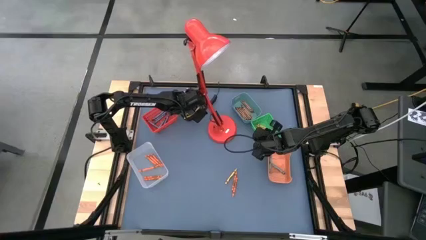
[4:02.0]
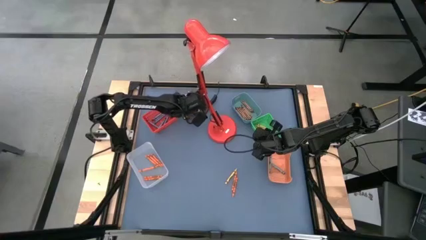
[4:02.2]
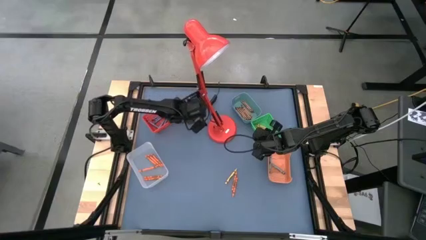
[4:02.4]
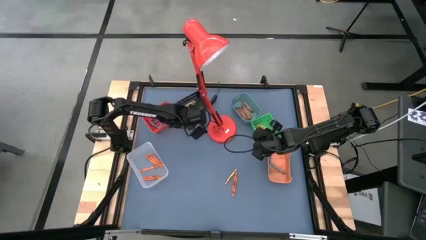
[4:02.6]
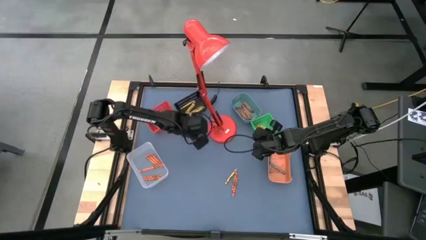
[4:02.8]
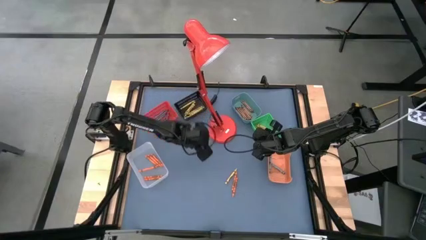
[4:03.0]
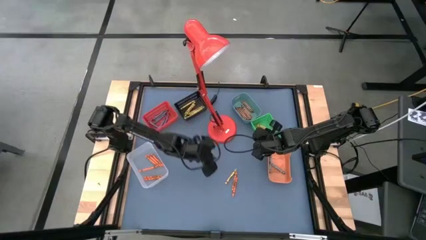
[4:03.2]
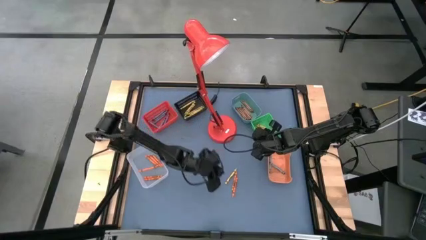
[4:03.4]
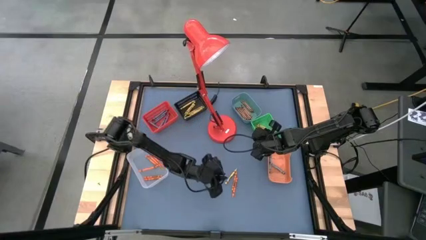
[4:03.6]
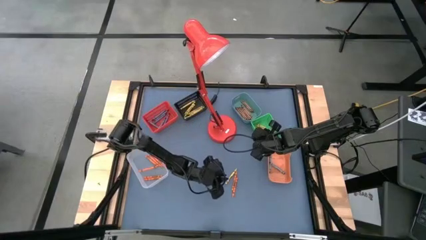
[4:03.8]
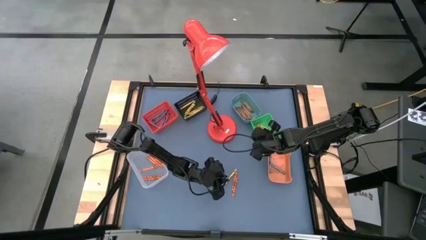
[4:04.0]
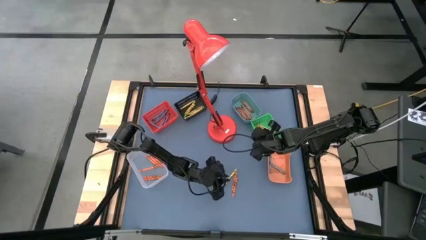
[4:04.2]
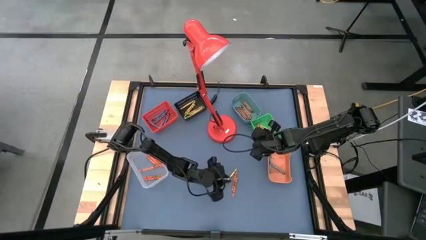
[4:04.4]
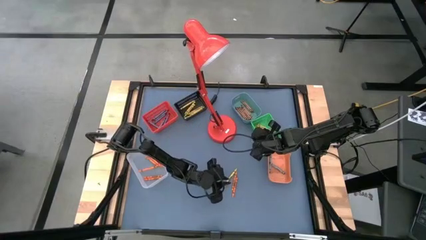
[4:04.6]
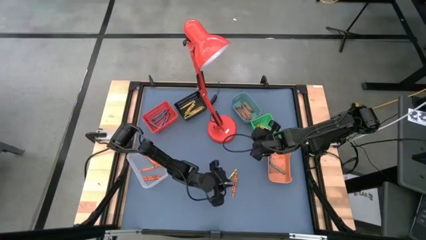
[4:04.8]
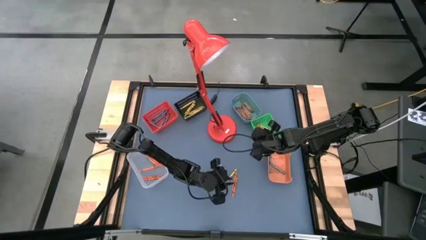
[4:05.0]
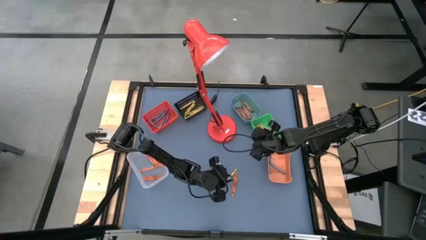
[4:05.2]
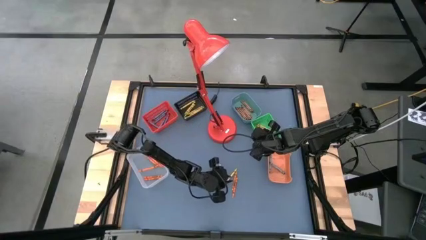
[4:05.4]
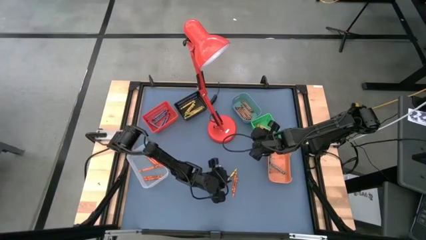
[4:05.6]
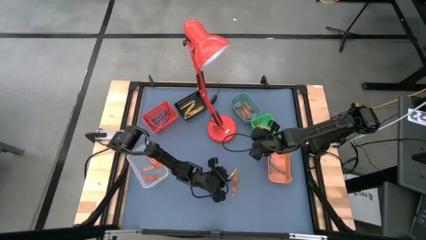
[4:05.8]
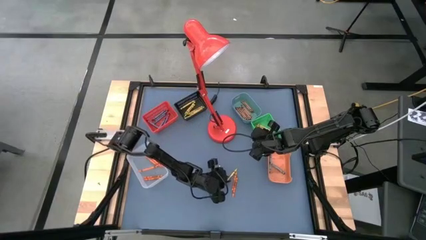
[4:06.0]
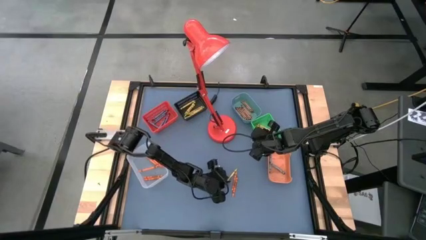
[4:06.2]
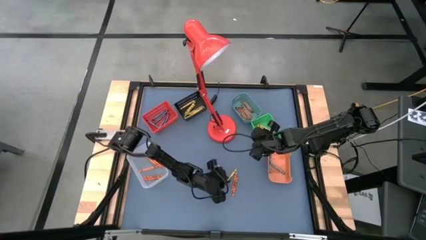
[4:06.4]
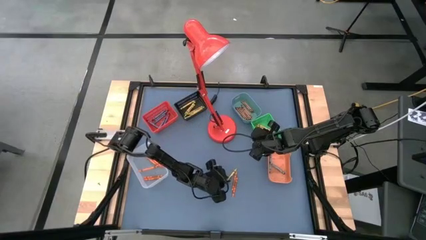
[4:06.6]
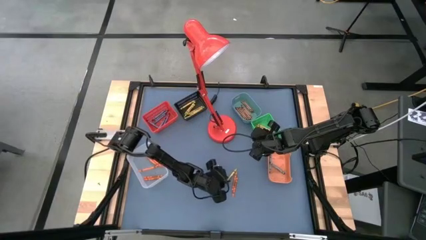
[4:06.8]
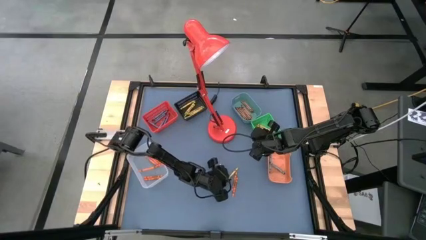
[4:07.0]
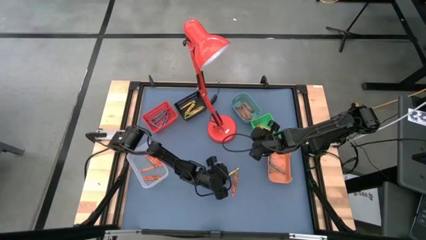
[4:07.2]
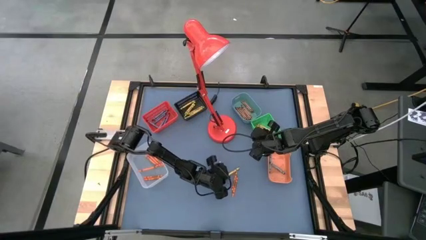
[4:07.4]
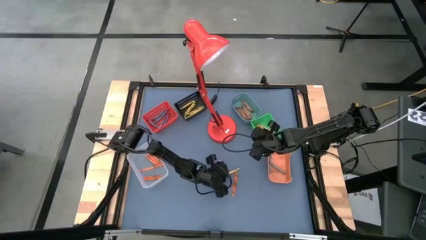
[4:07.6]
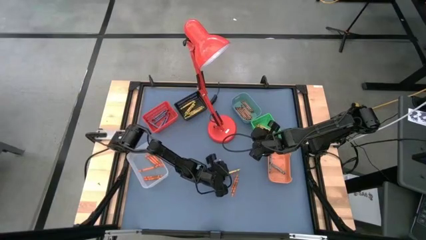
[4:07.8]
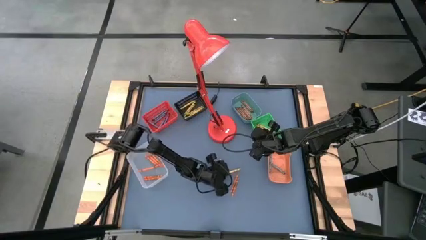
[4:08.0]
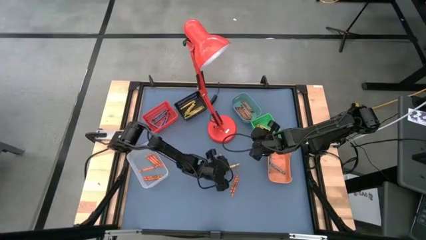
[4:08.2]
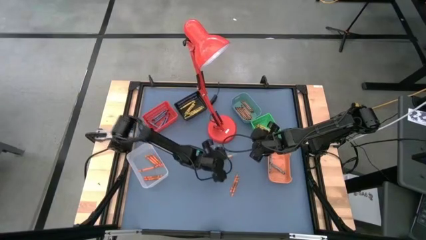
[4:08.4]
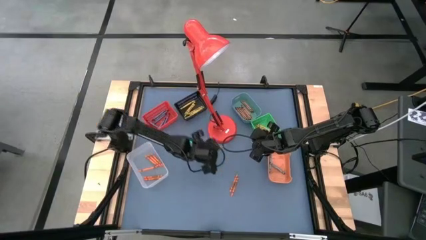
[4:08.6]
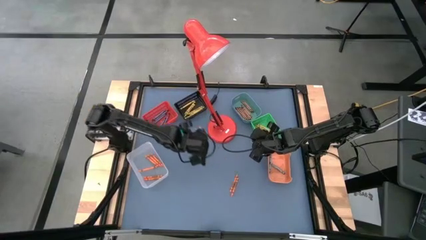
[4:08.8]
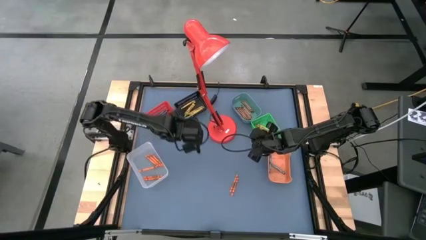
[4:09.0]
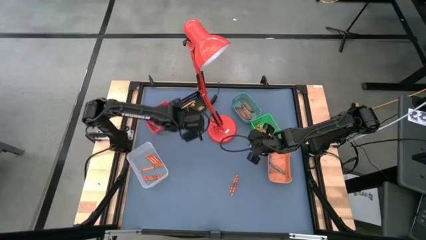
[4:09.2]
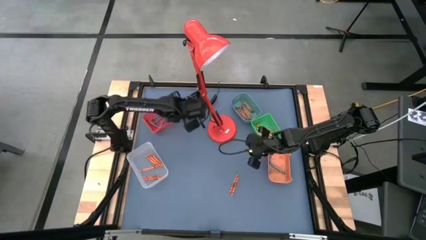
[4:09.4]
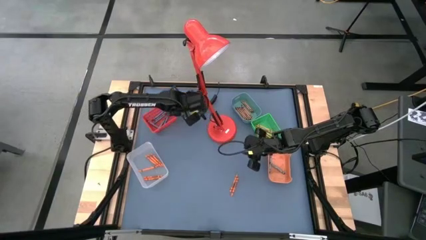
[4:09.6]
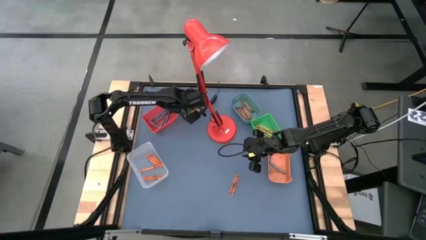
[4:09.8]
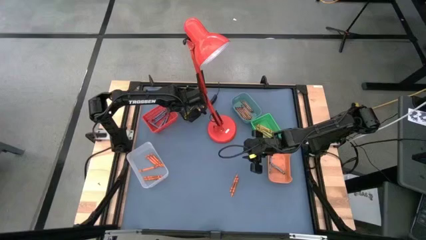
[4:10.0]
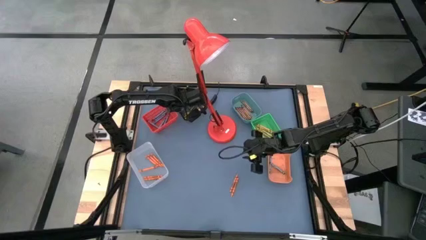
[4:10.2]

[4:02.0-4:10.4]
Task: Sort crayons
Put the yellow crayon into the top left black bin

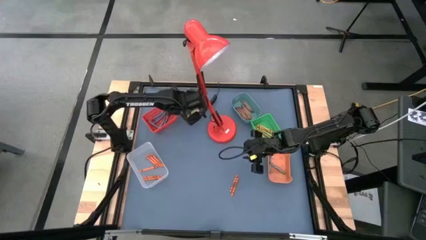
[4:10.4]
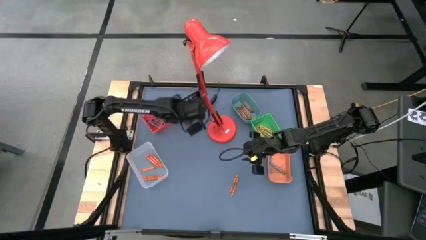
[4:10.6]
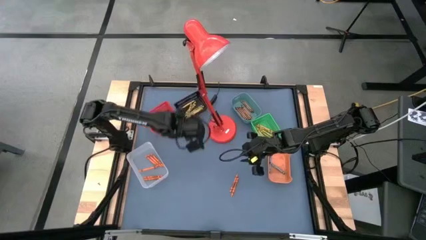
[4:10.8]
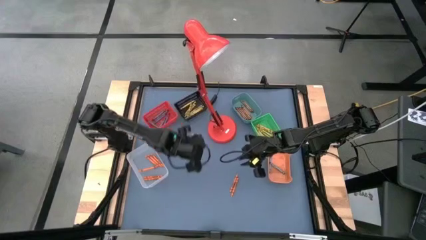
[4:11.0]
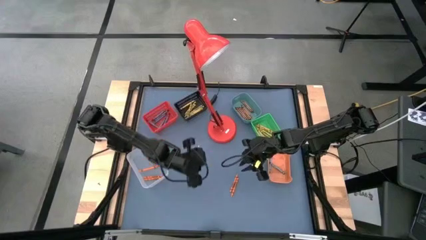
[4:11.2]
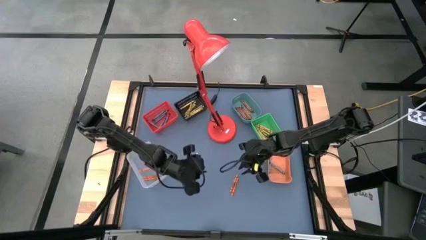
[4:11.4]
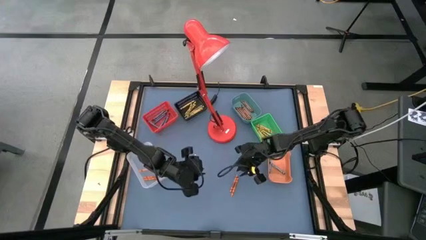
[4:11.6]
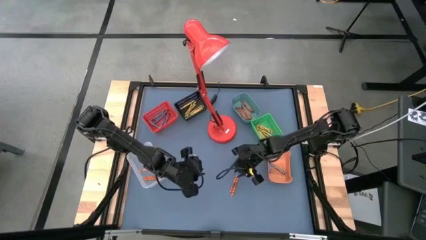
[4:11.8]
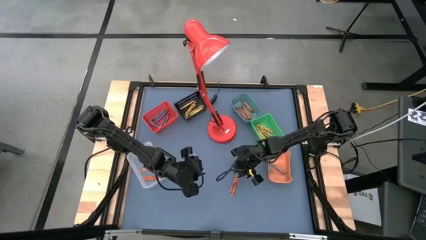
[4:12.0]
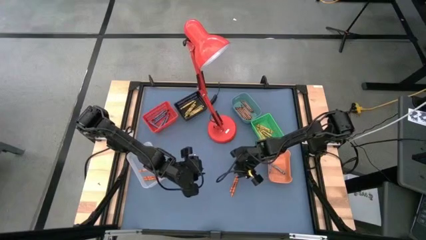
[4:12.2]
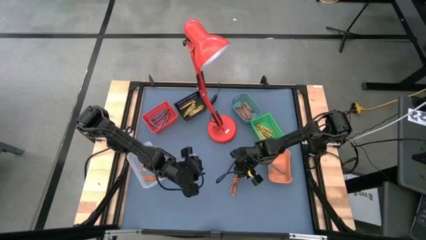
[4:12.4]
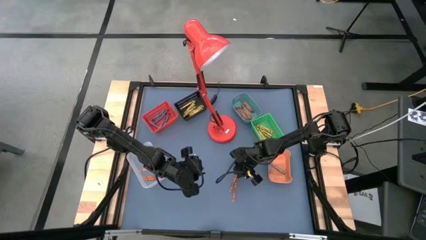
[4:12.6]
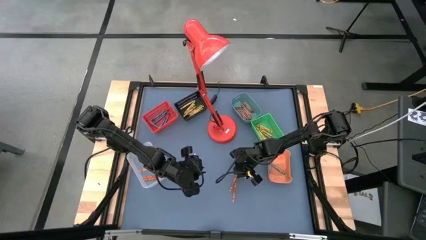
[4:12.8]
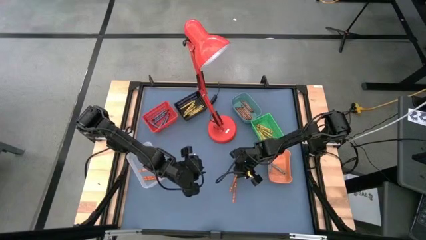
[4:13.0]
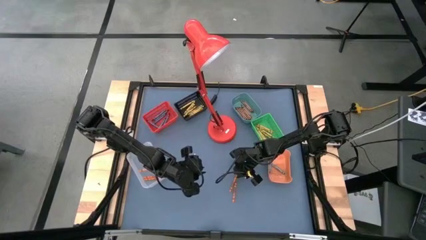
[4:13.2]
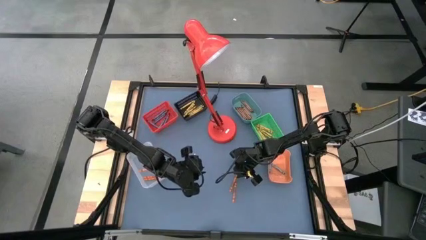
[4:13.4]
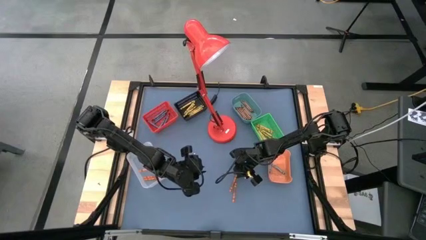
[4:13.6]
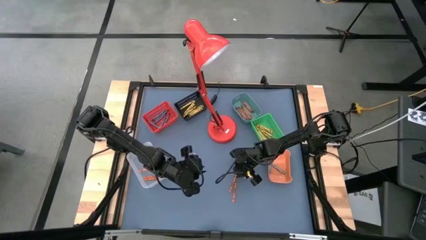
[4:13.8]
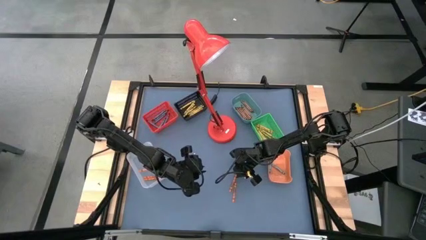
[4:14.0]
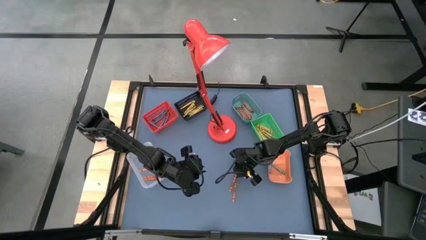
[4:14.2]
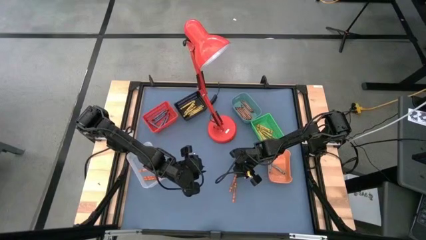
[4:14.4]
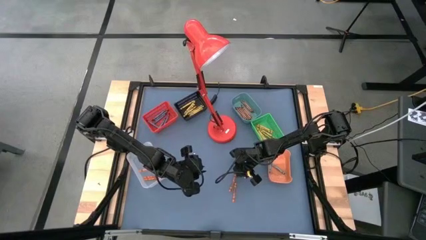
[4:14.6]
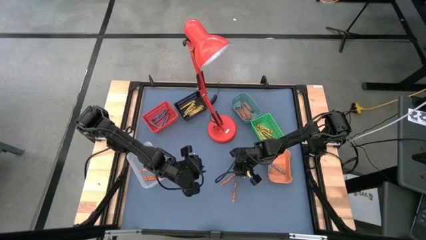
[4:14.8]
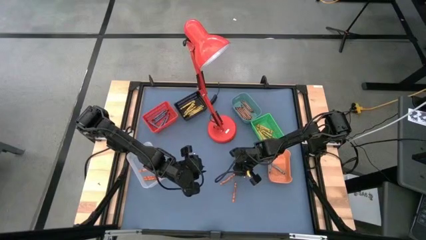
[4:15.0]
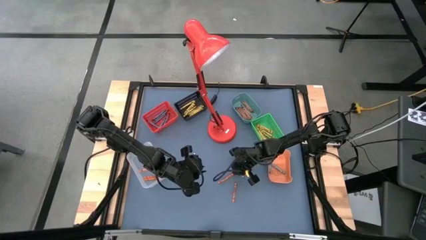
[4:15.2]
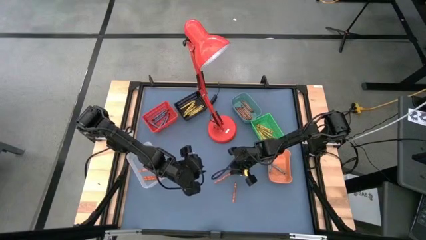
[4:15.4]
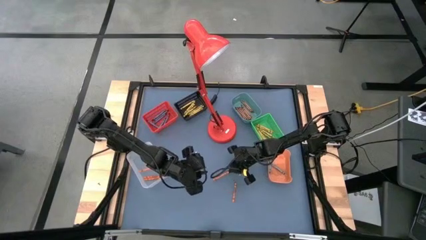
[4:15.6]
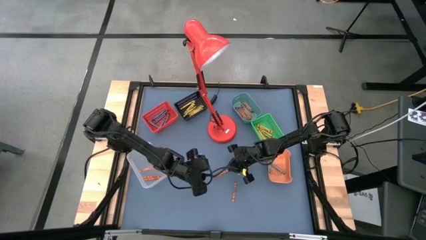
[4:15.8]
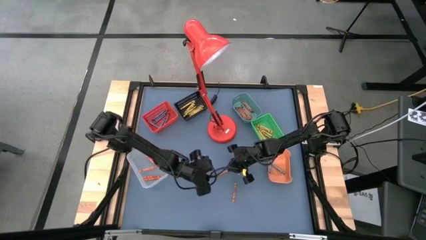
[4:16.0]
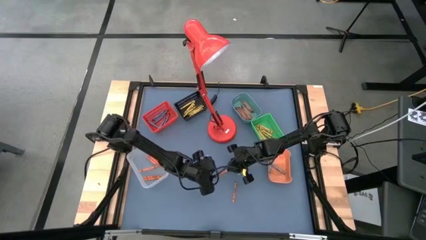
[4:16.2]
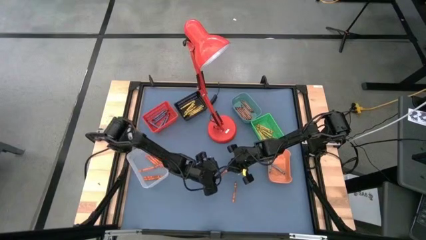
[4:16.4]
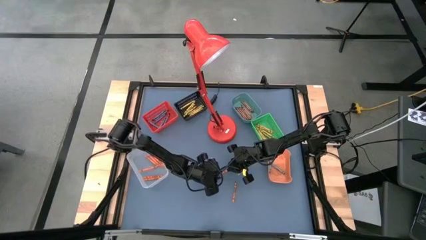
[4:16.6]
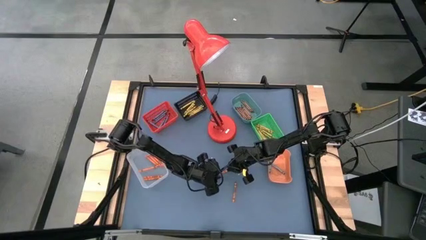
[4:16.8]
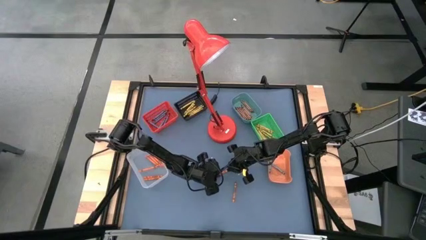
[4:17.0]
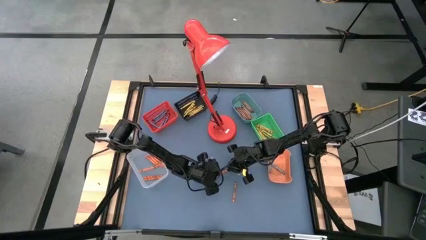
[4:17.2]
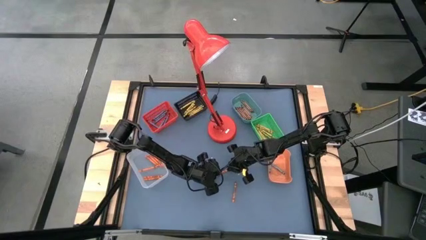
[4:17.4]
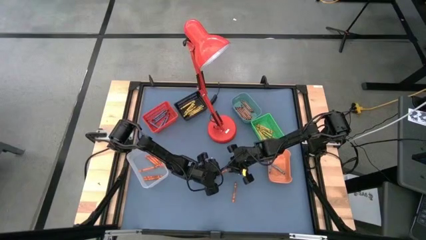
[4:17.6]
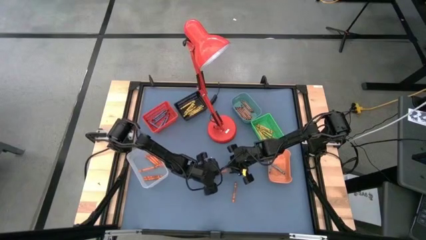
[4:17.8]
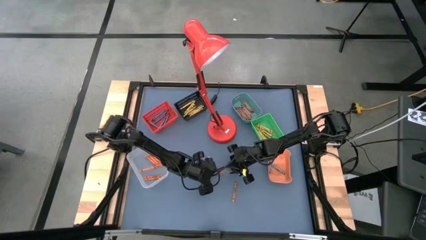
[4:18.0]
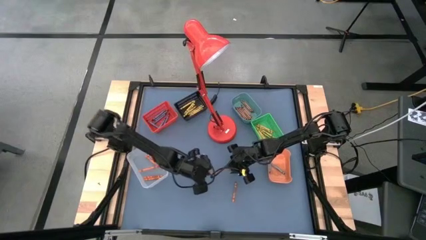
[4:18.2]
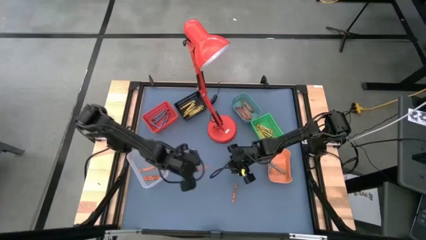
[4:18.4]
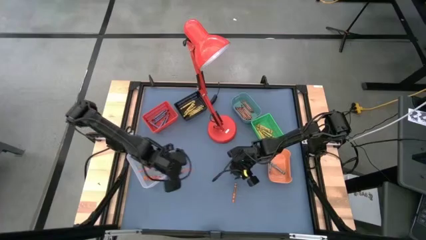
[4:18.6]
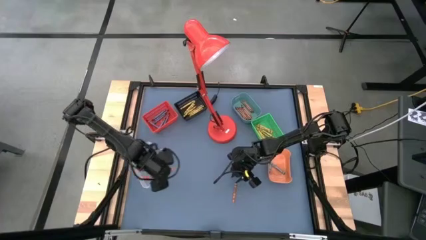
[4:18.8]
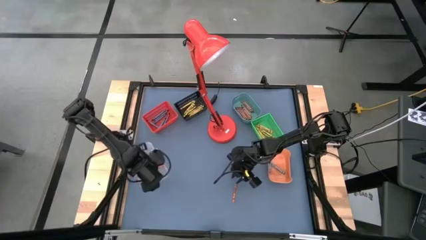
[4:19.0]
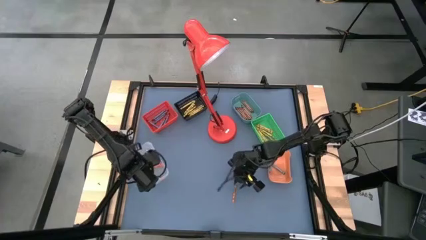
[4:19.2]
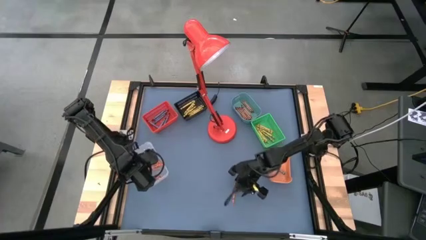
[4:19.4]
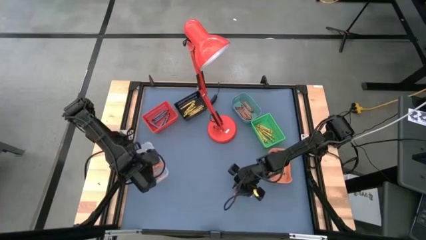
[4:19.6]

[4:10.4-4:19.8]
Put the orange crayon into the bottom left transparent bin
